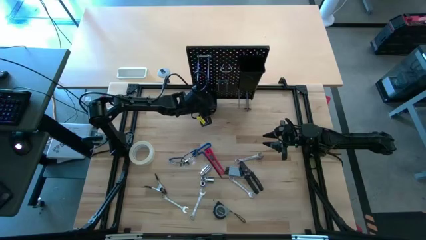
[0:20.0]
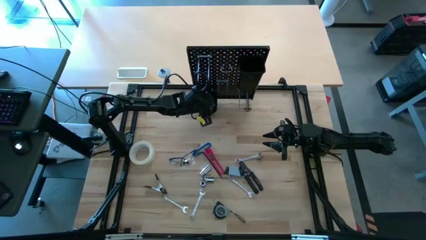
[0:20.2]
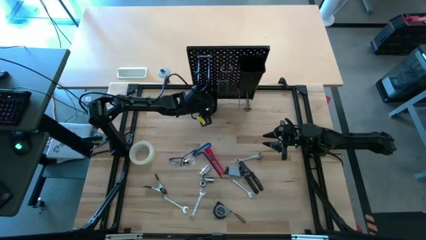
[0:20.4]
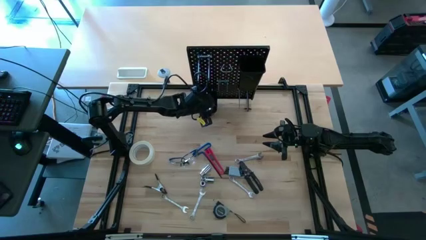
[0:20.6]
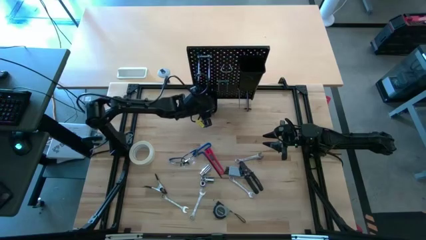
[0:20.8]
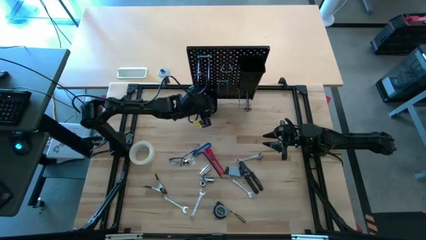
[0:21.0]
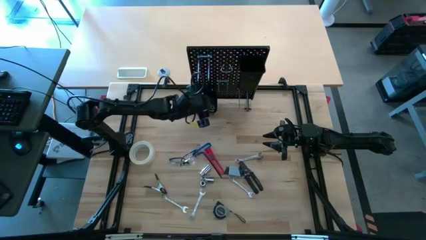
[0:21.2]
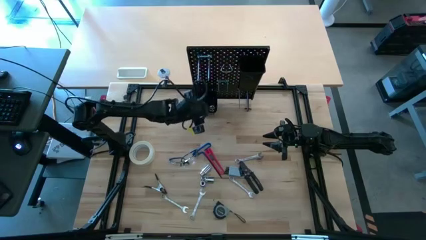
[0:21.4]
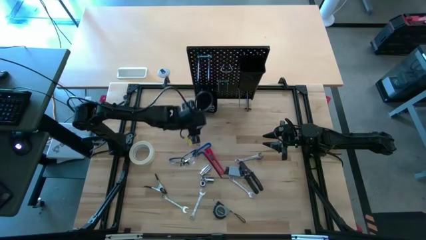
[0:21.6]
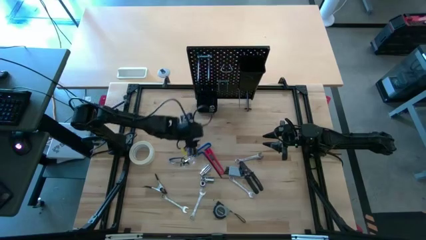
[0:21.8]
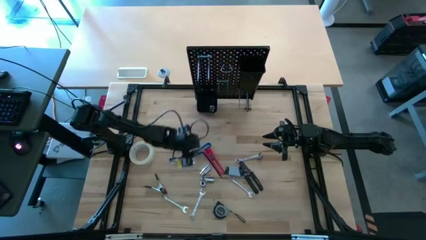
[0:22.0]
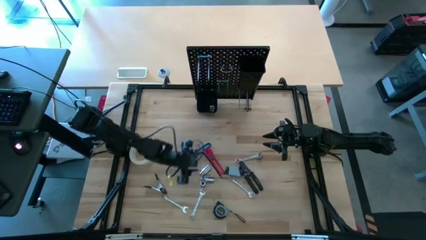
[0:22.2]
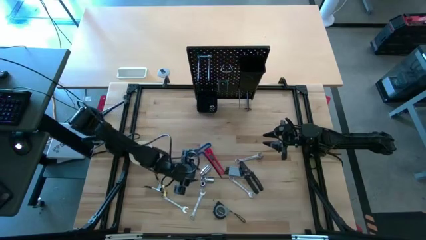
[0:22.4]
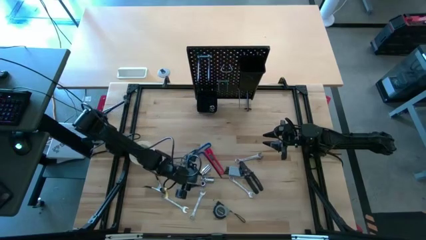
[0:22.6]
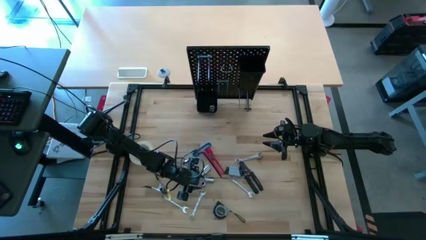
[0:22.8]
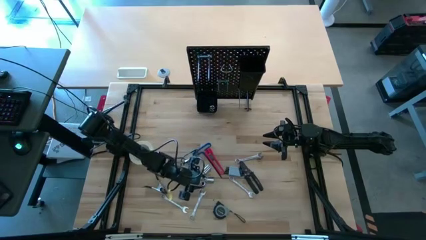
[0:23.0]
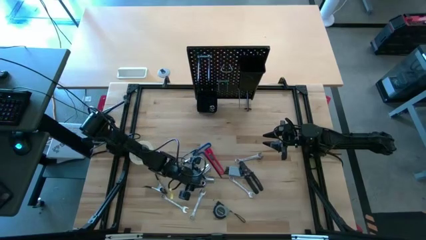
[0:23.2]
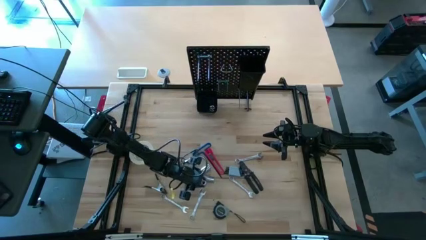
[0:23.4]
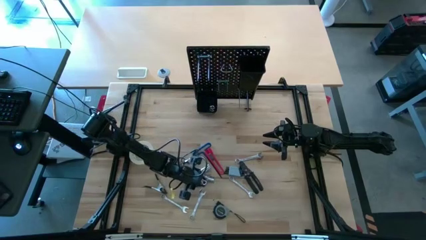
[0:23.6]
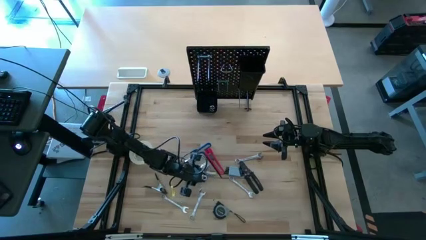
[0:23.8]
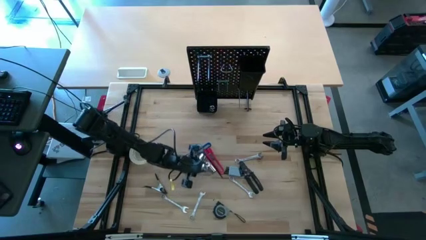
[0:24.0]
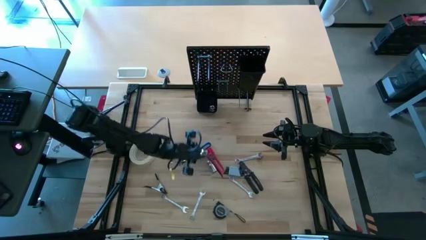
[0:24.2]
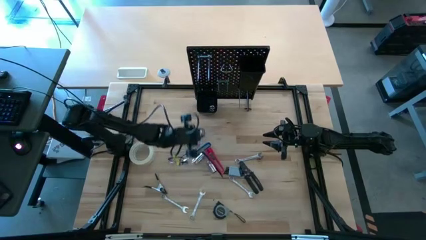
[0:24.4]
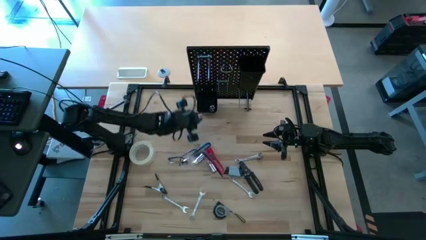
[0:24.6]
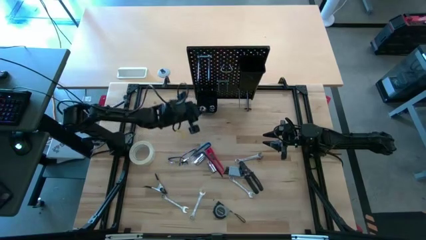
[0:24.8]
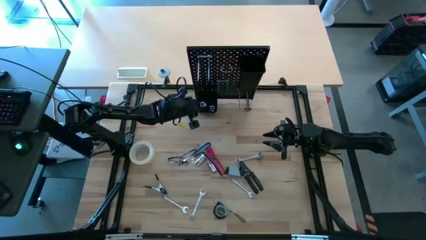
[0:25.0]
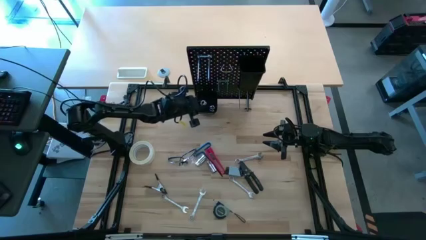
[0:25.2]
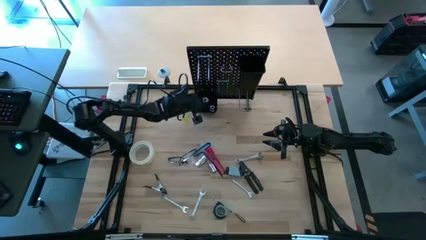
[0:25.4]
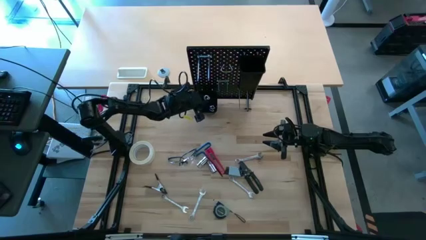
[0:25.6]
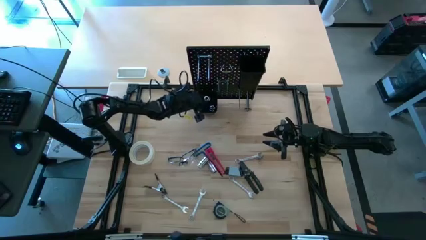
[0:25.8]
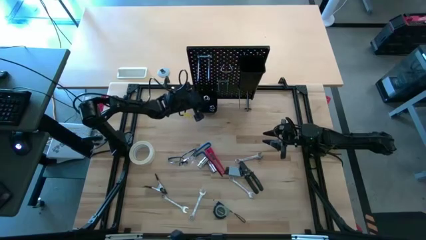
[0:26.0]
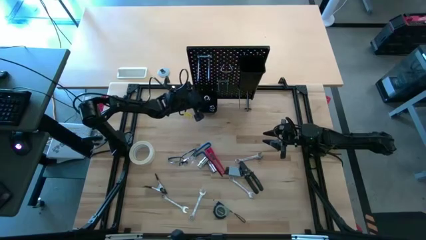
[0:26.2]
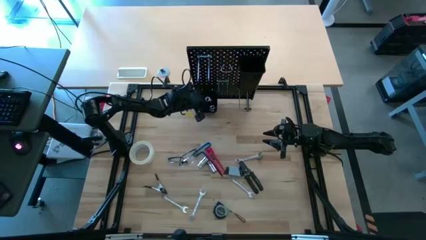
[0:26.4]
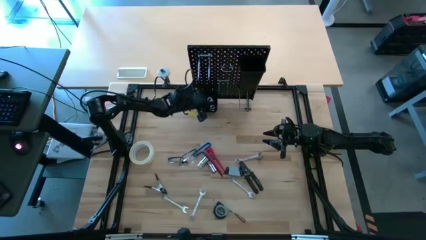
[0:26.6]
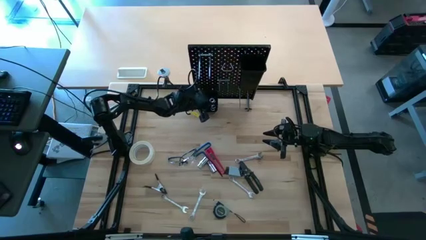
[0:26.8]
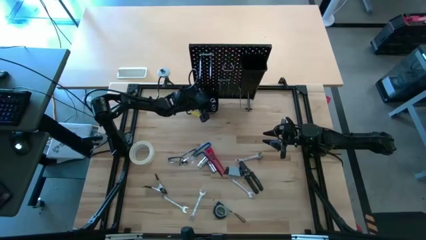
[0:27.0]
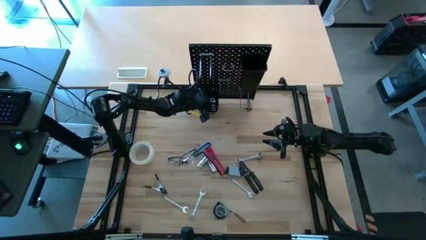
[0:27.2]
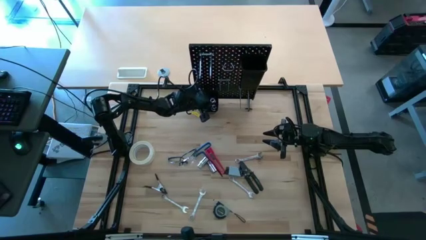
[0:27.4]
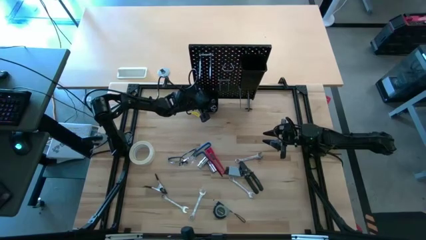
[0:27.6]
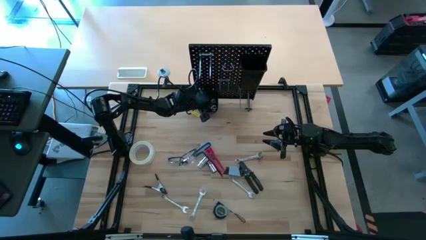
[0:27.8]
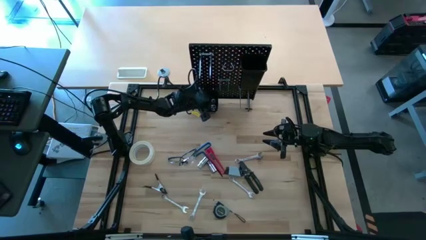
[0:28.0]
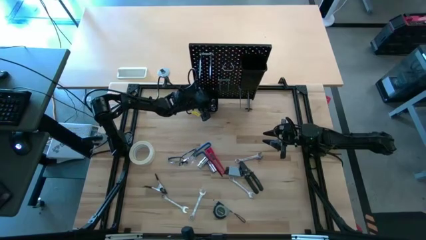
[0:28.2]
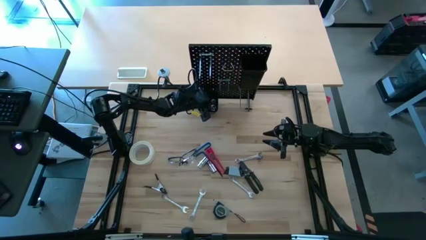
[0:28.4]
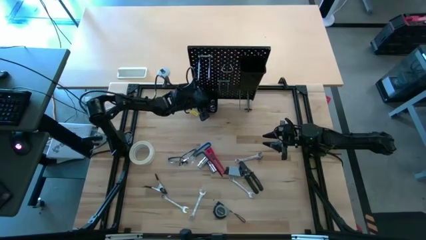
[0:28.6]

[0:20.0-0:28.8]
Task: Hang tools onto peg board
Put the bottom socket into the bottom black bin on the peg board

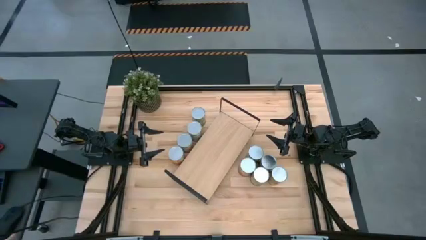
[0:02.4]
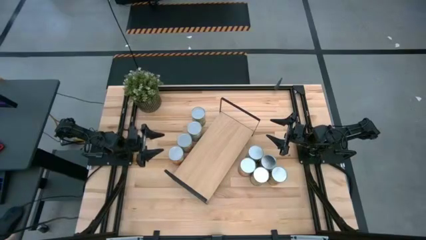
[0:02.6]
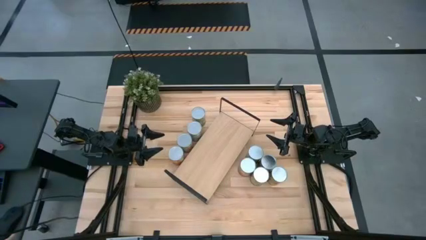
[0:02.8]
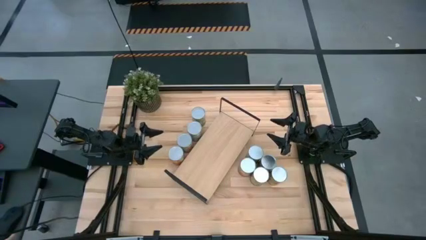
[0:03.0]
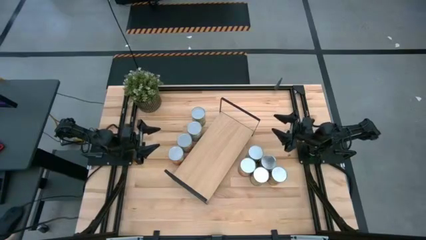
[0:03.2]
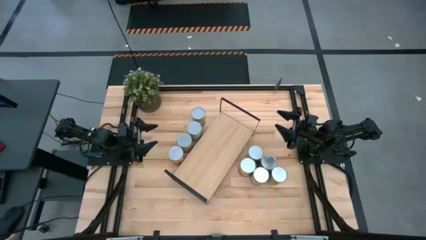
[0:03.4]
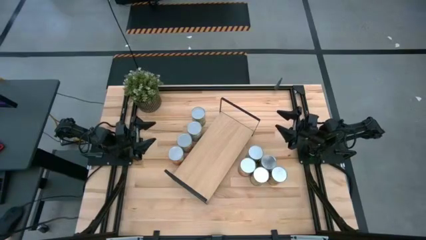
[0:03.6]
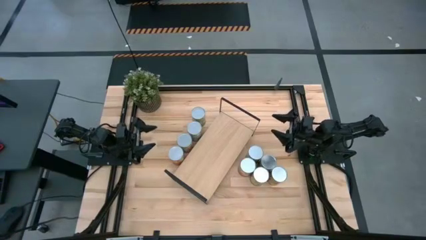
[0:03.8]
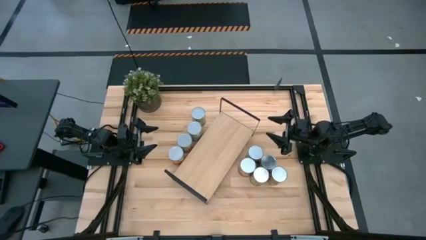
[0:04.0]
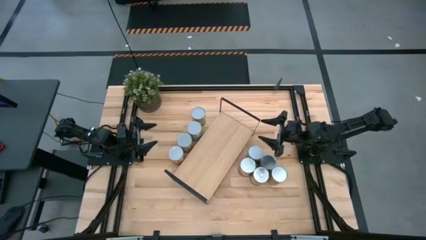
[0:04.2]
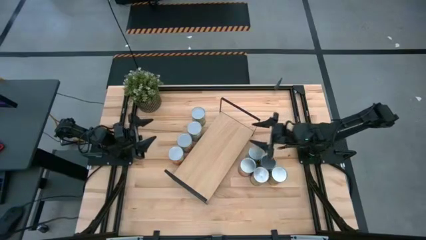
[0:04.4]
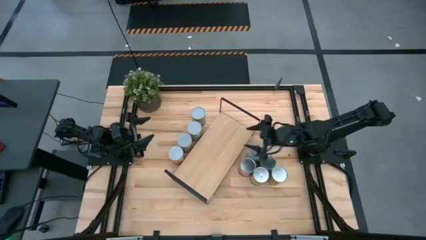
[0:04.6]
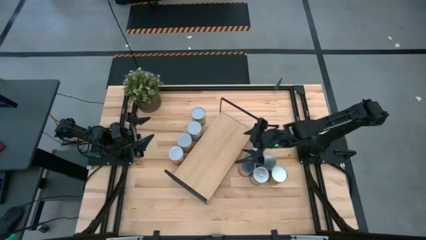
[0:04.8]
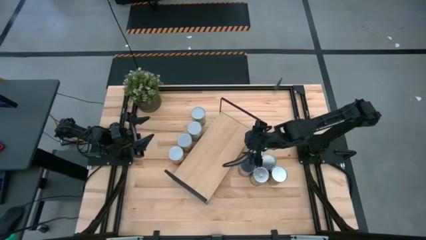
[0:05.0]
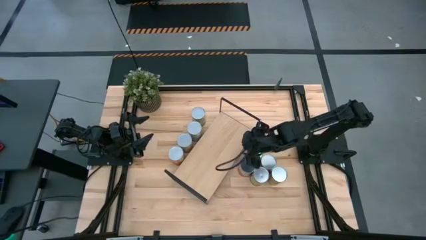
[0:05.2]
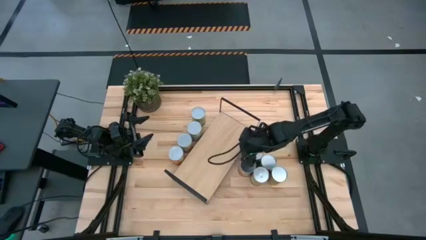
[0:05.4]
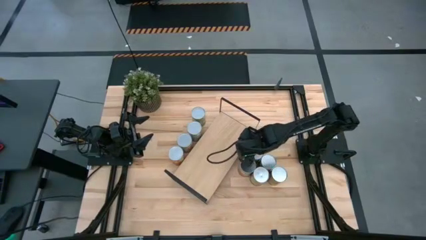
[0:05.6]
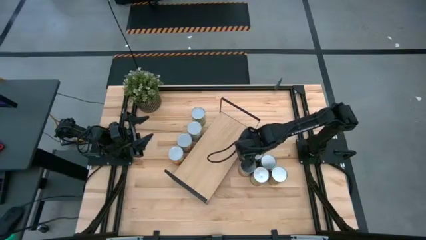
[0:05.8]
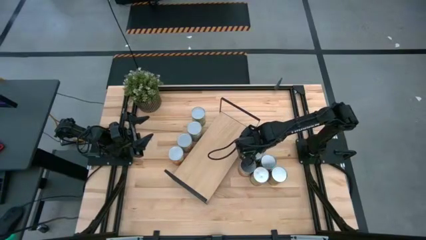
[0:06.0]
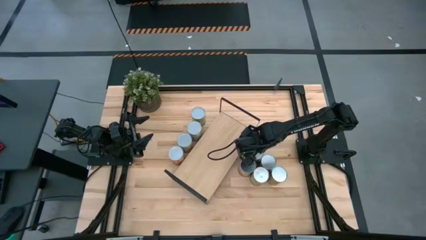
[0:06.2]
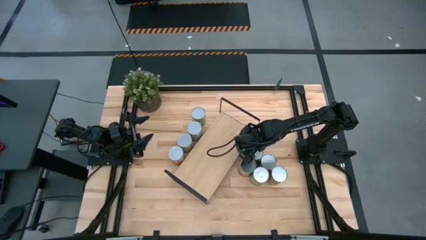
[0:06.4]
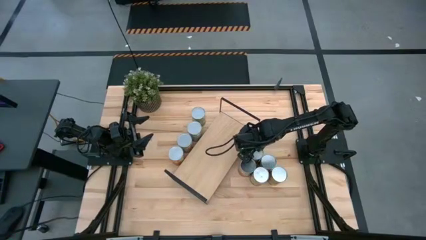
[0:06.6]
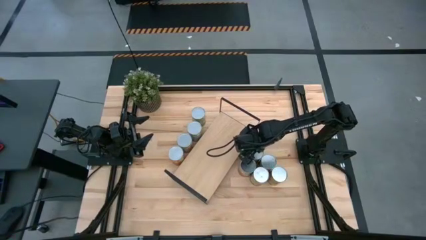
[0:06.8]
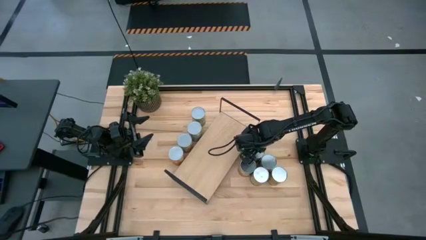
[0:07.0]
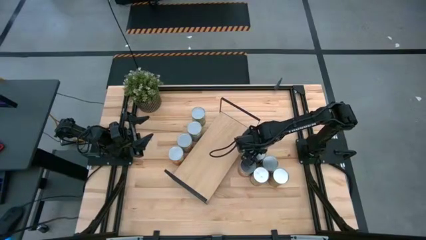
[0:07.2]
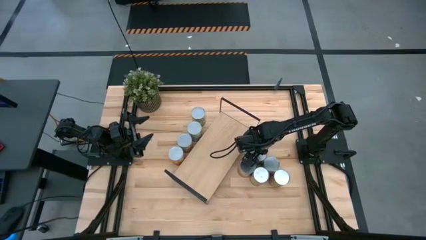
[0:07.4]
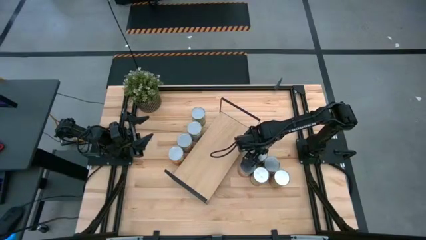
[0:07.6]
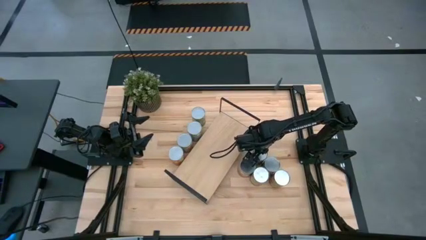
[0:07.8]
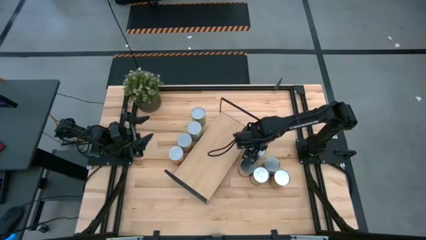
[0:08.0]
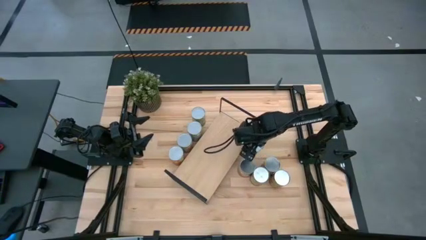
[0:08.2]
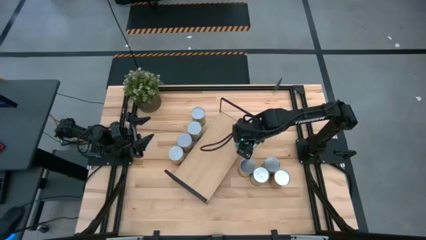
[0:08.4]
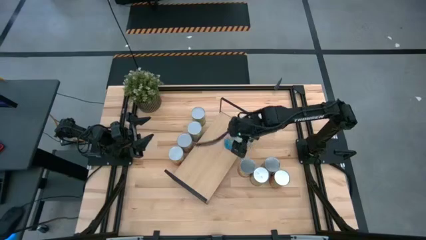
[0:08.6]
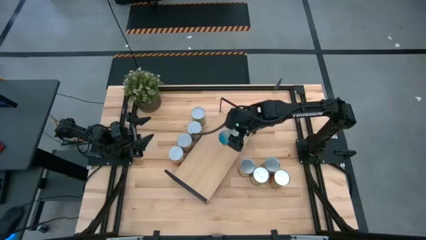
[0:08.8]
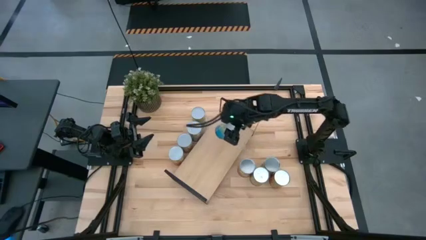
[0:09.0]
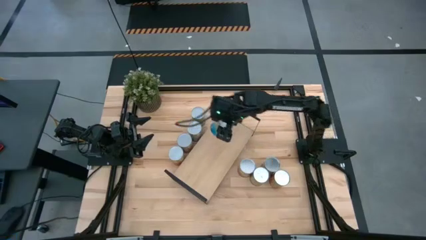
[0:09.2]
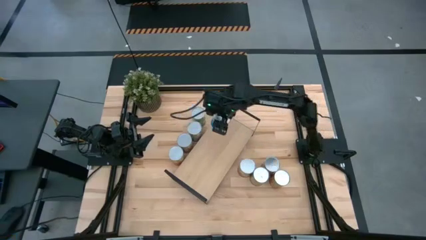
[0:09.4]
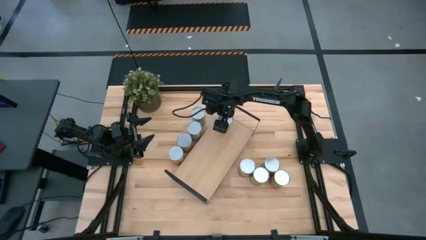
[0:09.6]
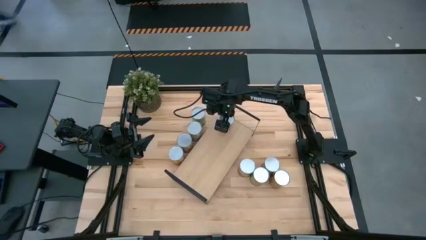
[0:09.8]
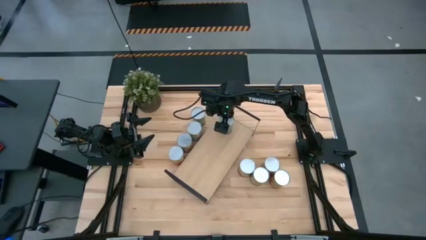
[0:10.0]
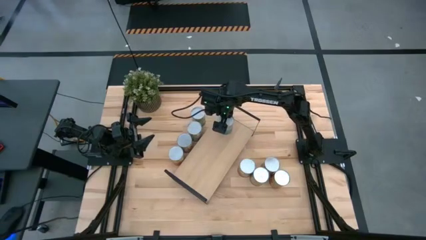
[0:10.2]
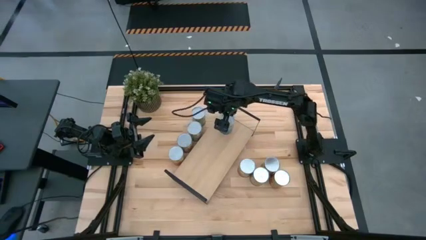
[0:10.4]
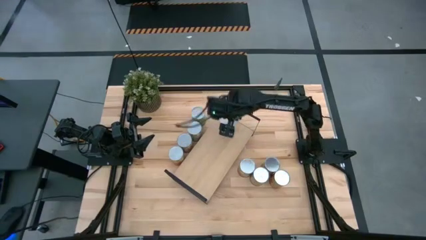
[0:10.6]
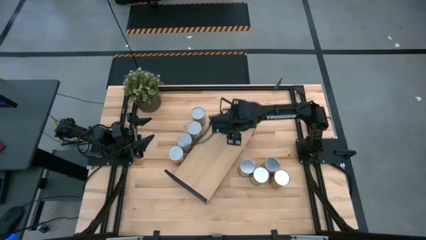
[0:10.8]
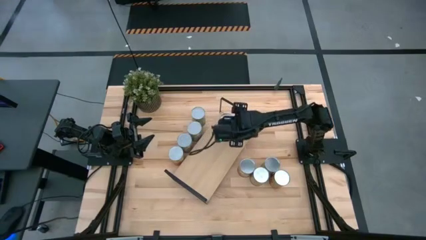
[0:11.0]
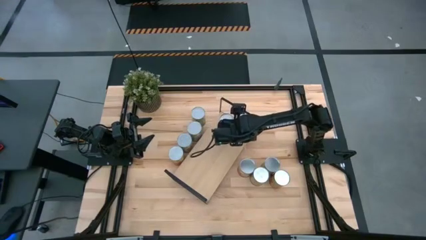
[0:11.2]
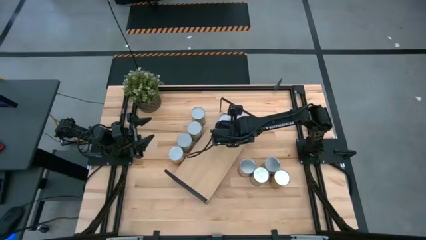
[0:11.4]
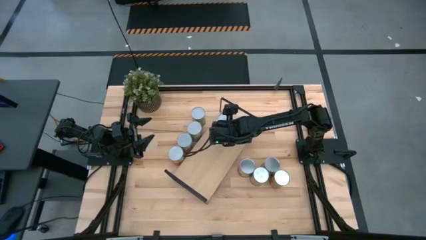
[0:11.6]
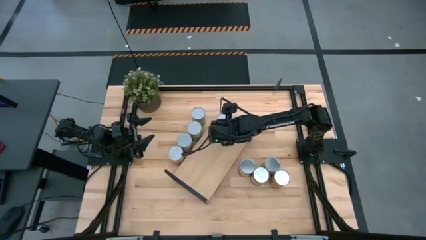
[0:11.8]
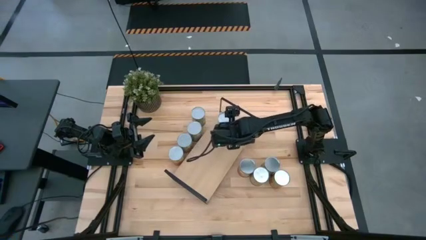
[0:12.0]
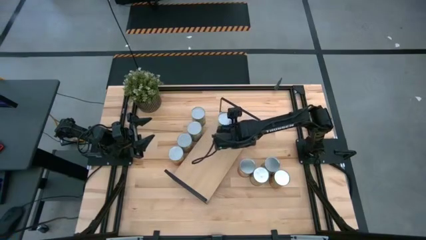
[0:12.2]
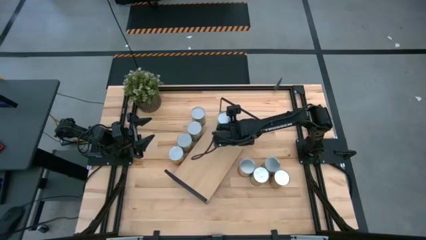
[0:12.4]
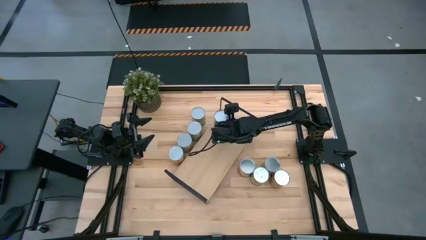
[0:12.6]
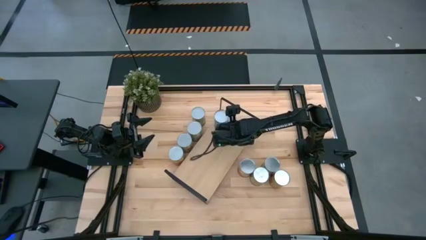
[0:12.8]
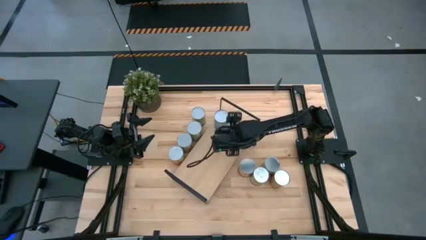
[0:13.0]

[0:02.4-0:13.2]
Task: Pick and place cans onto a shelf
Put the canned cherries on the shelf
